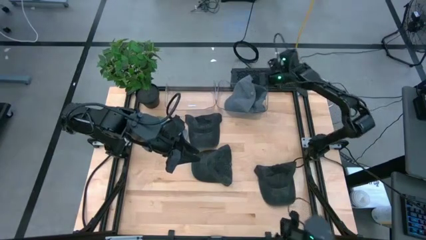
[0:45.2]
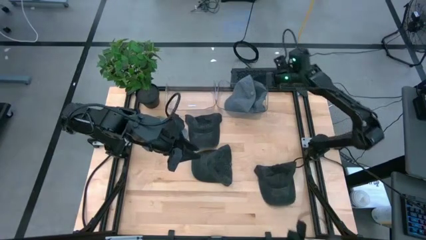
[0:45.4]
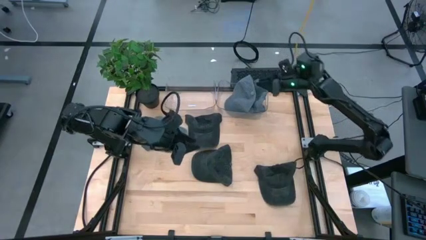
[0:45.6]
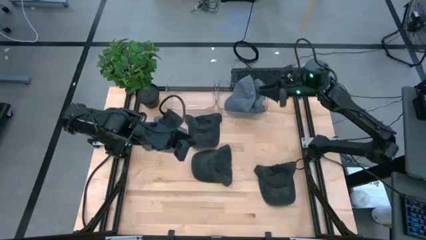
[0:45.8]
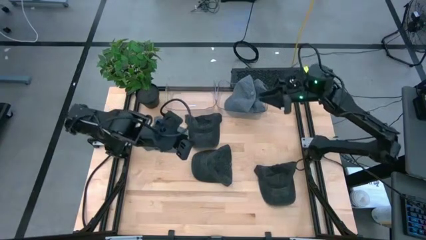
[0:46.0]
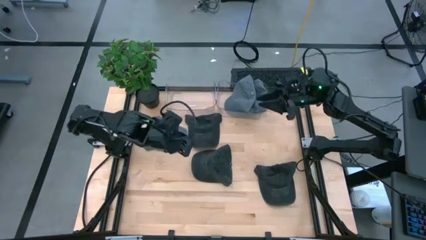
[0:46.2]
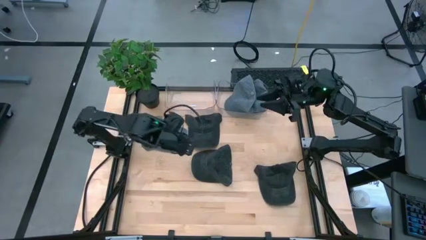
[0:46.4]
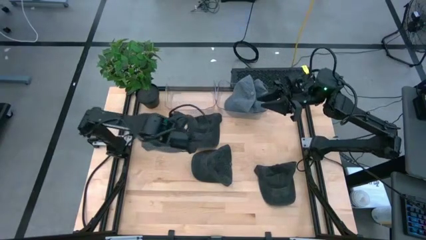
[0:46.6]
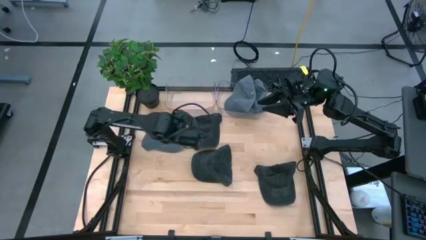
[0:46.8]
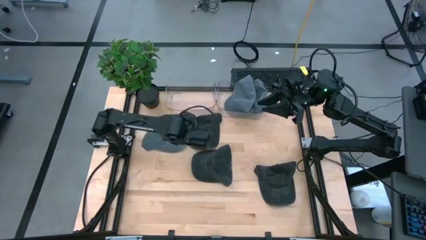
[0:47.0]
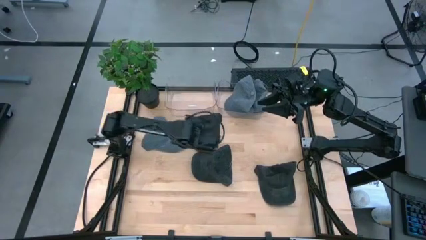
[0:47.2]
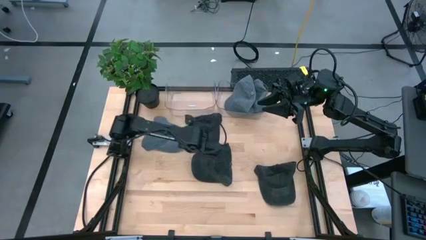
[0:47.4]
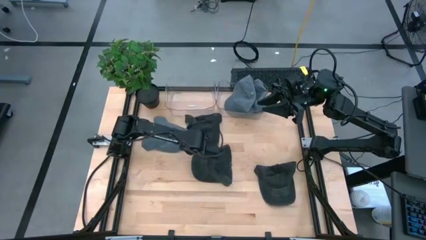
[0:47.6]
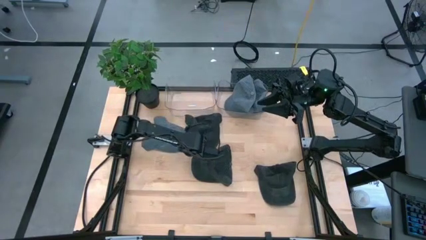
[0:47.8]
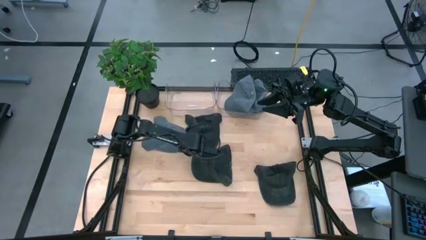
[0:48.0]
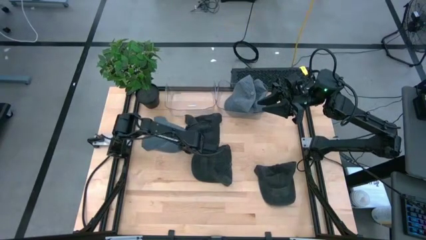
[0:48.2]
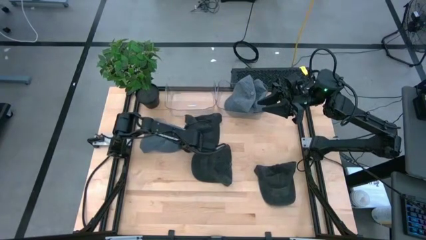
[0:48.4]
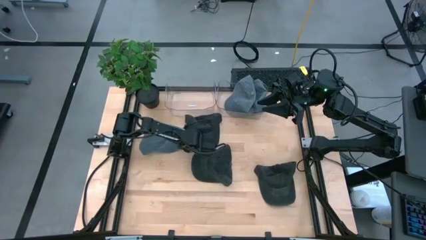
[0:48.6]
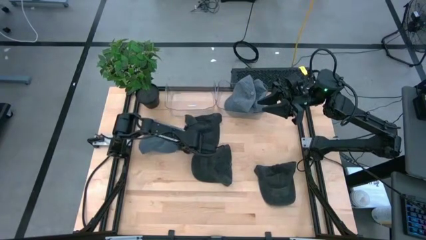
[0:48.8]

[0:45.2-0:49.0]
Task: Pick & Place hat
Put the blue cap into the right transparent bin

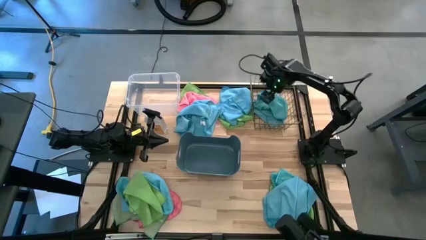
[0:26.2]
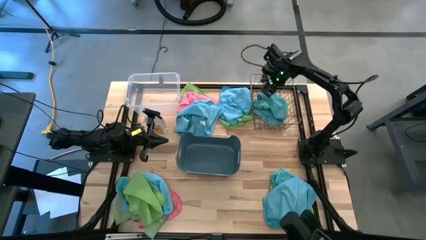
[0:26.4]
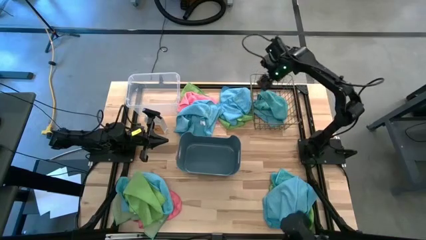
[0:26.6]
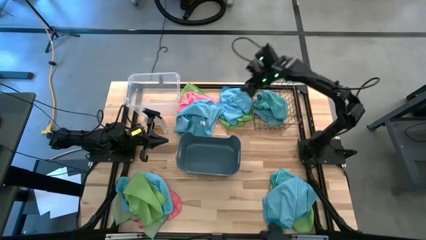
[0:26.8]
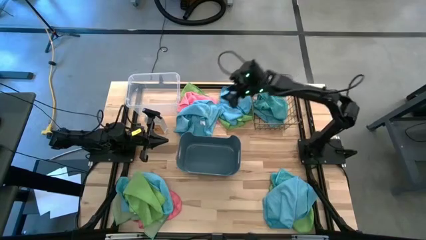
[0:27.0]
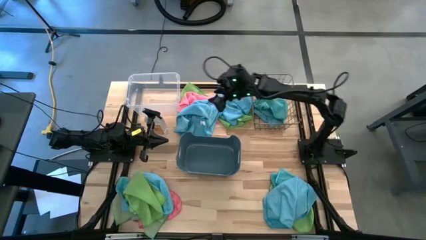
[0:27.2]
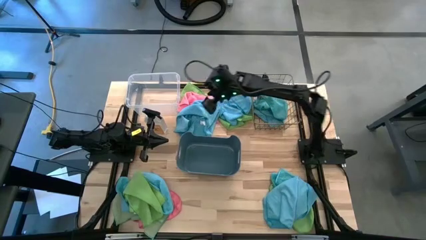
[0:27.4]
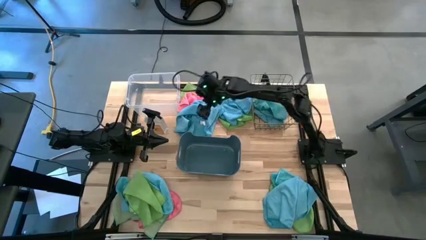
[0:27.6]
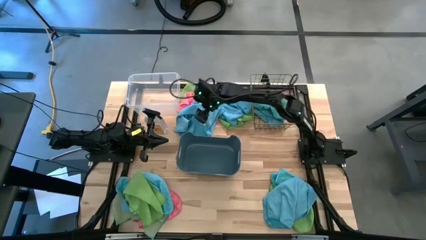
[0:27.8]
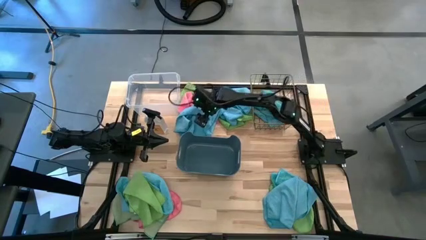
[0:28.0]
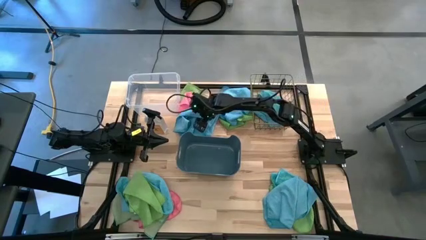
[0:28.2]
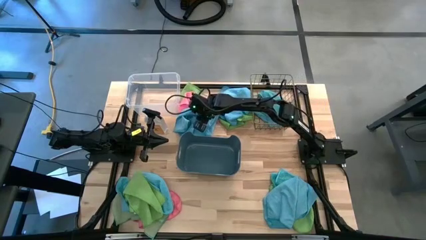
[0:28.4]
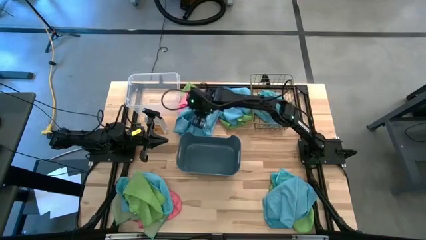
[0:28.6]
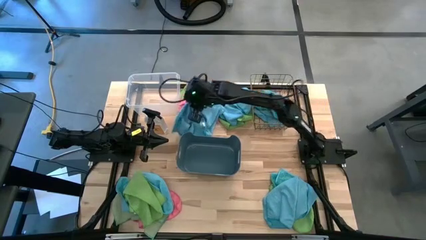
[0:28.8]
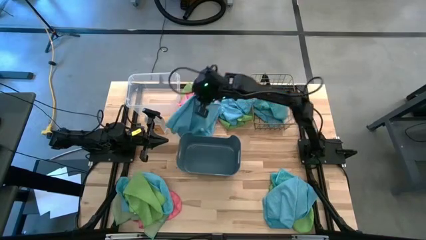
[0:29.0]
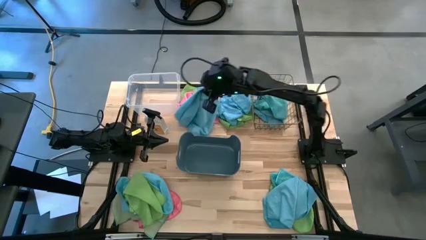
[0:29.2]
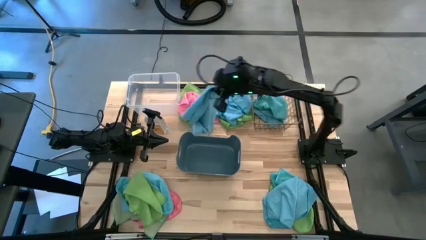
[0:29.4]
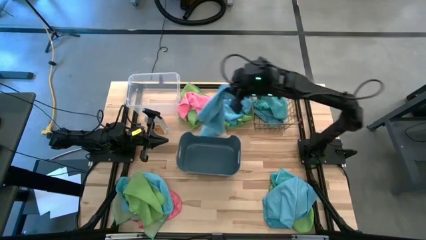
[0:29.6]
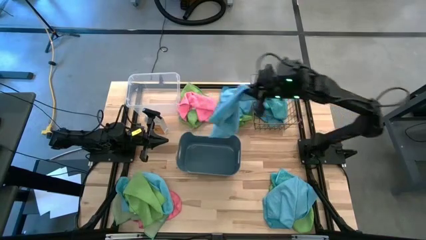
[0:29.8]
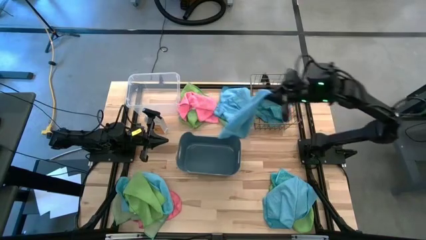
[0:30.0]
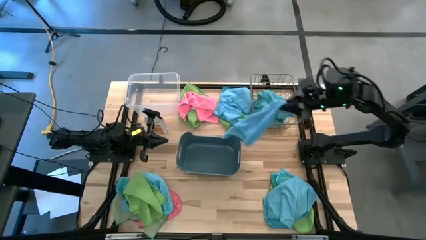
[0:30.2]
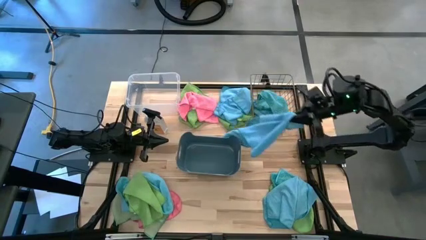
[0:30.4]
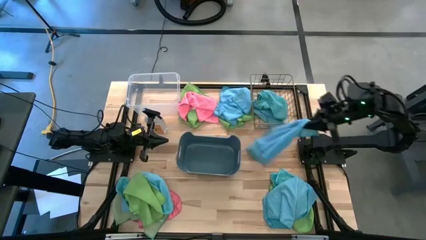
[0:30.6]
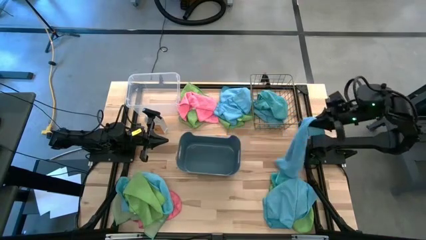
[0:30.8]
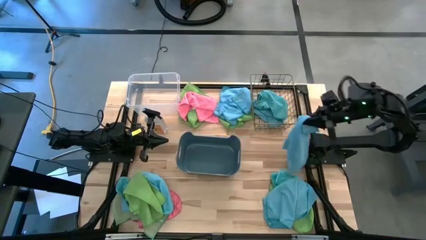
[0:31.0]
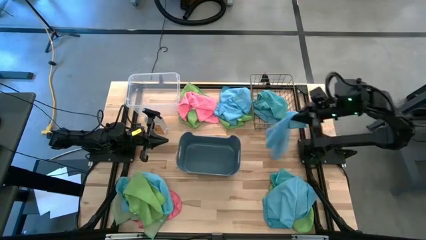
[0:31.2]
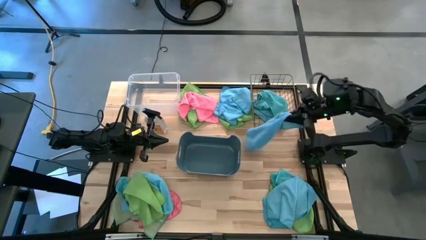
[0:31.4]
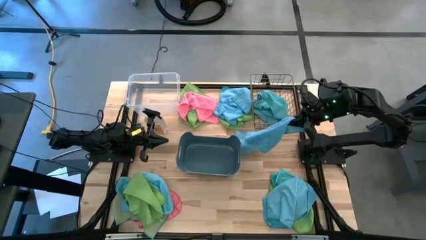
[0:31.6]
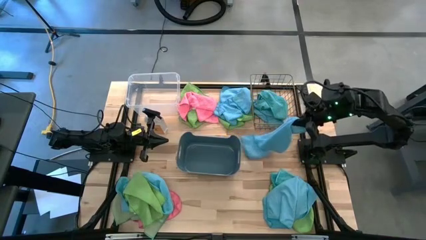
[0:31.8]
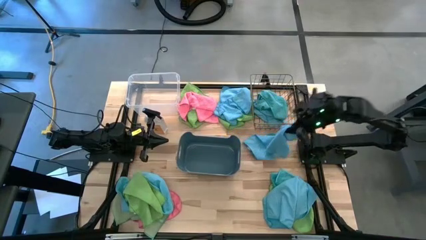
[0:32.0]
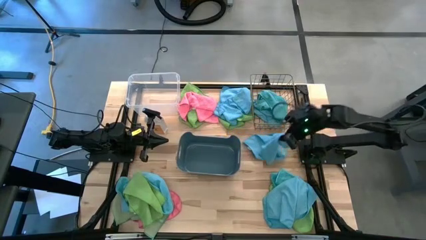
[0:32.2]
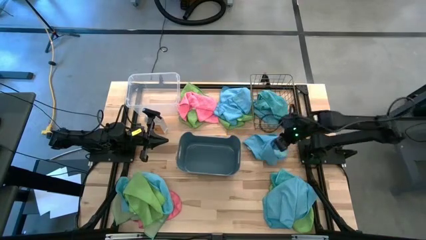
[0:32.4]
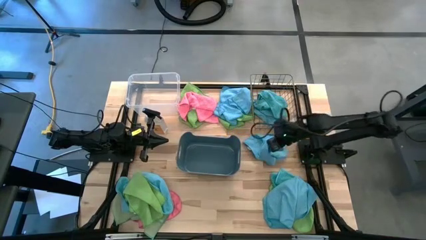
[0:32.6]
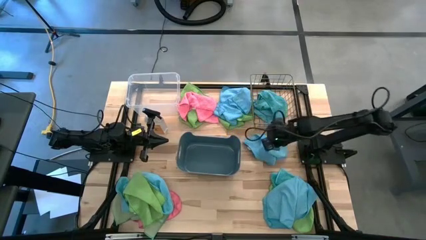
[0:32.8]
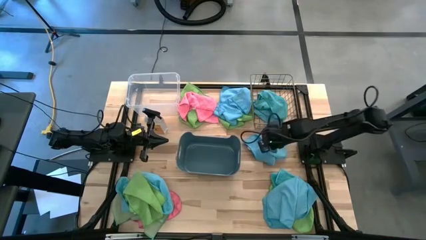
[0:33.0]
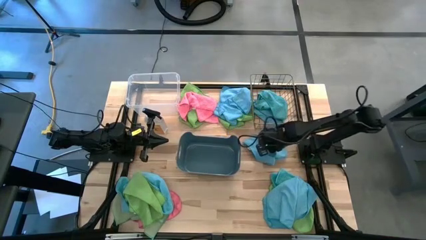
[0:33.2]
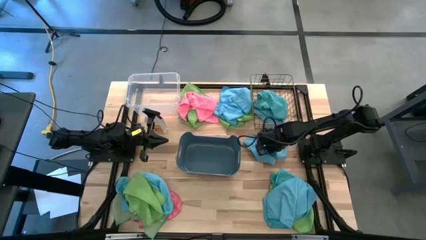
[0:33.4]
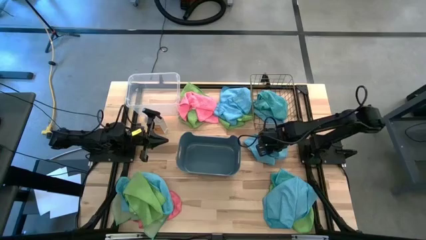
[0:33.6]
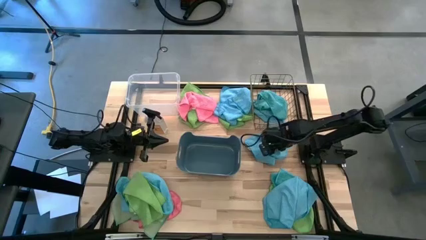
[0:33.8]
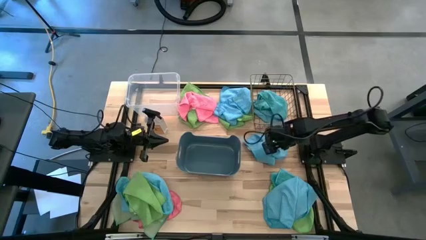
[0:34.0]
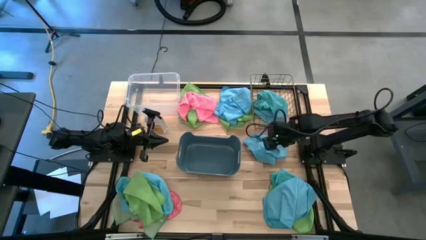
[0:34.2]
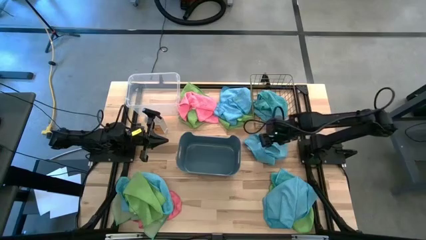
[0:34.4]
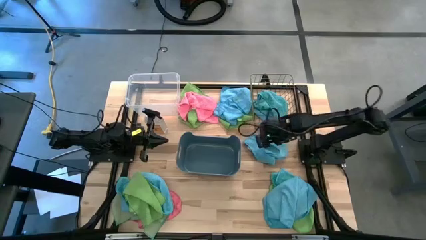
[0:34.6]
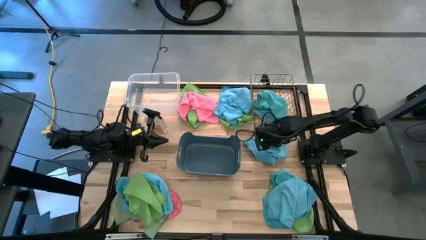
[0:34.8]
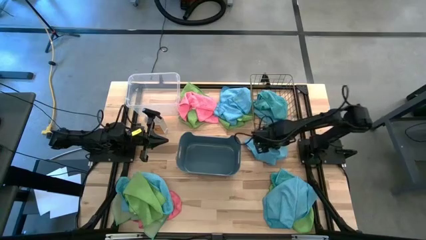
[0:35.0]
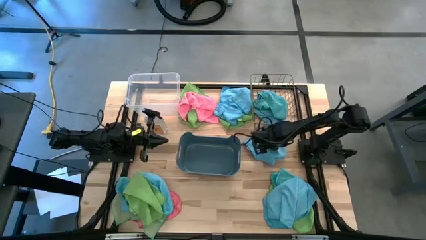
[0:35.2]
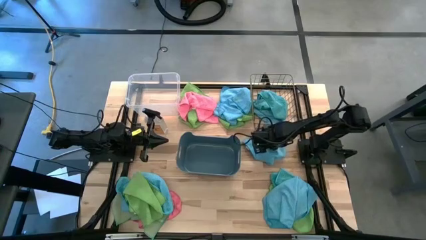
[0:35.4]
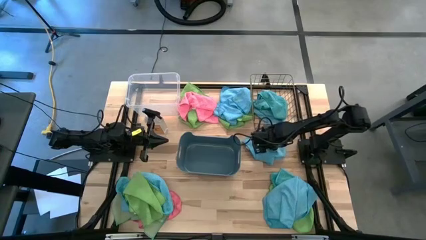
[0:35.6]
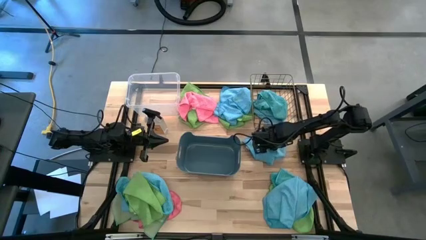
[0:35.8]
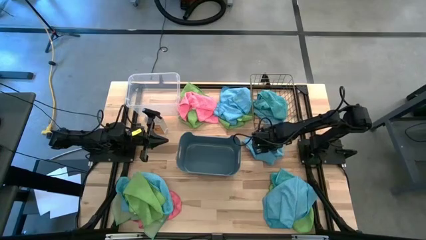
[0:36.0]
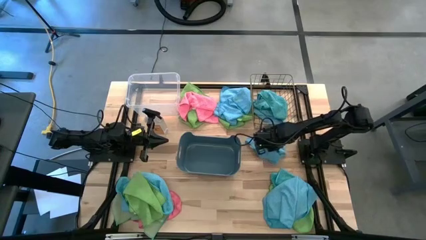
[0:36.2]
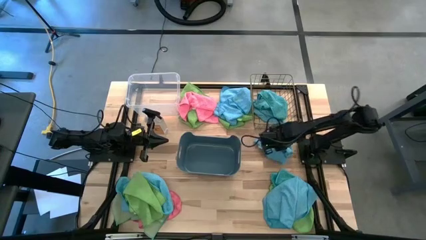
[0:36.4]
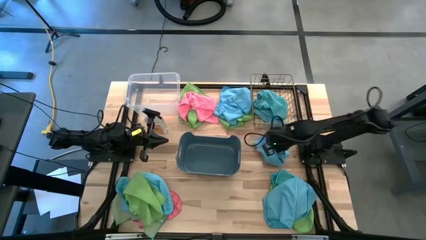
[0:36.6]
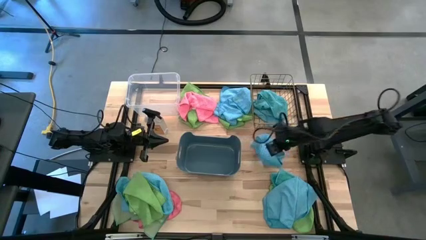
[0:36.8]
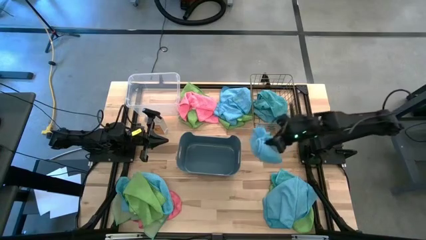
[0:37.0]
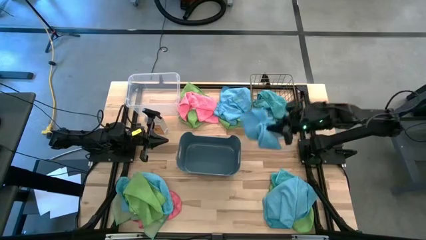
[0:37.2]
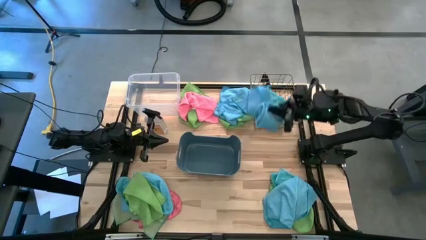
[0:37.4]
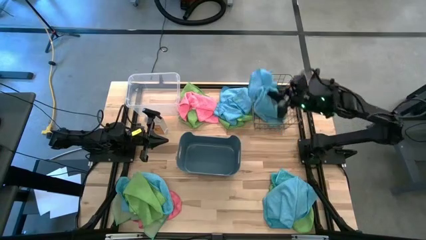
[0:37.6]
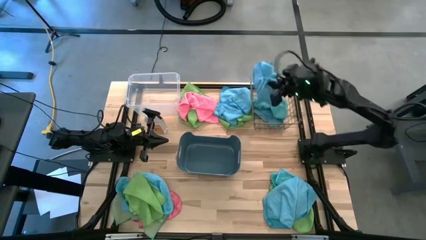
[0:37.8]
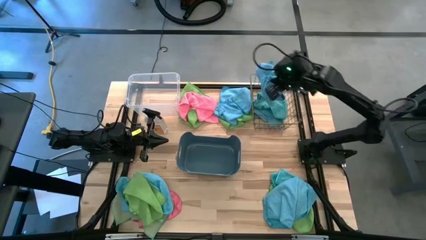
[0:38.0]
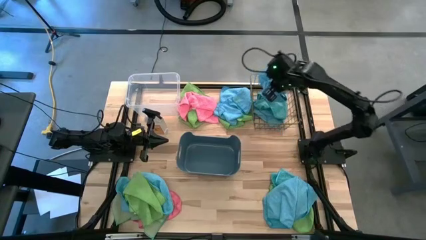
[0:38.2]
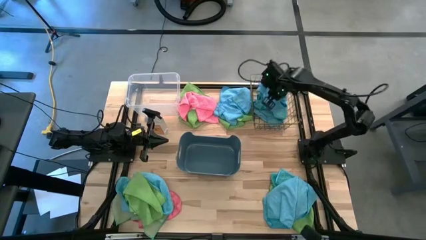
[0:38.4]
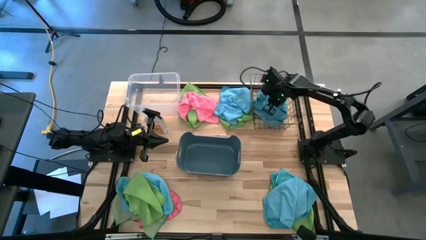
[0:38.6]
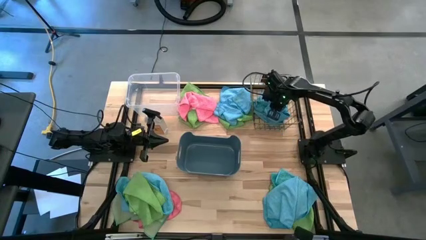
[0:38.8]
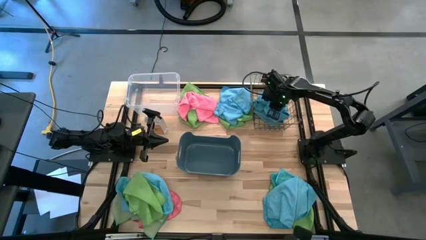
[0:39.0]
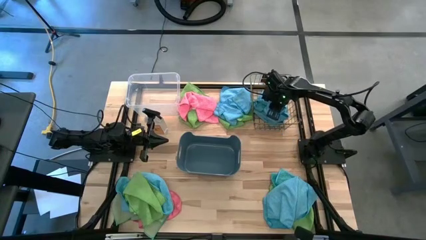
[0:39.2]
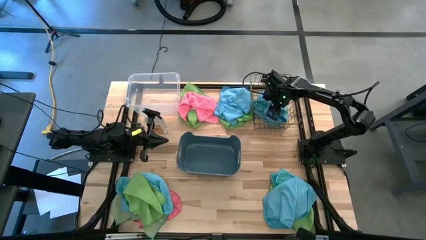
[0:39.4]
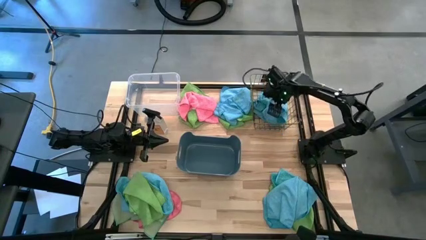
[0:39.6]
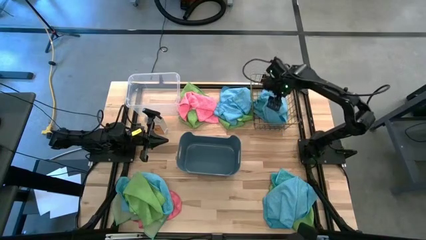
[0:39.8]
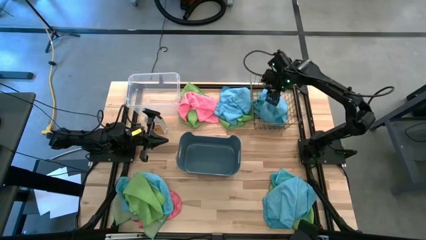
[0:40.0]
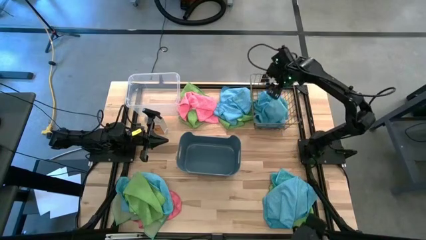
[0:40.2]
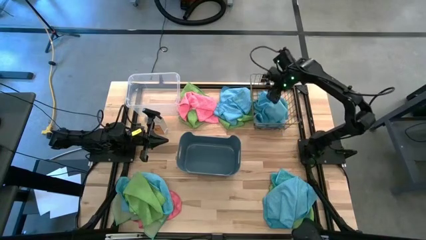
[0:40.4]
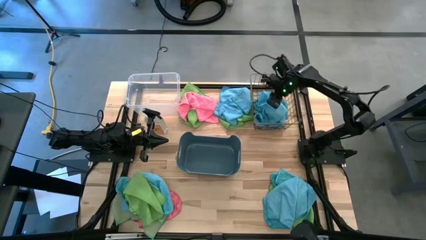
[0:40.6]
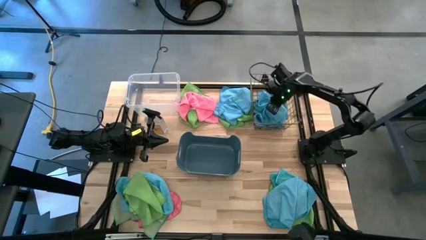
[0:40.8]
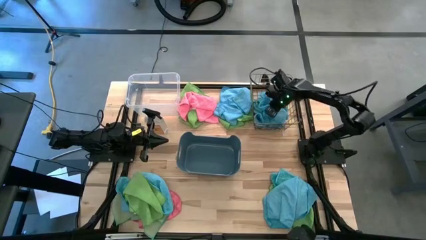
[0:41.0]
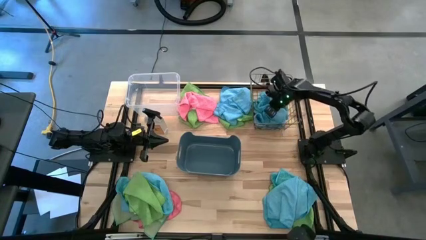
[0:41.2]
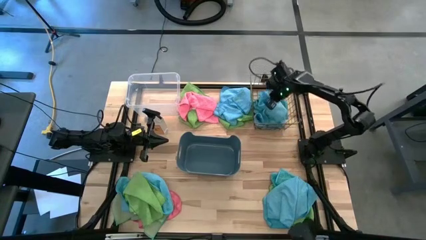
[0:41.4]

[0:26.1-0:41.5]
Task: Sort microfiber towel by color & place in baskets
Put the blue microfiber cloth into the gold wire basket
